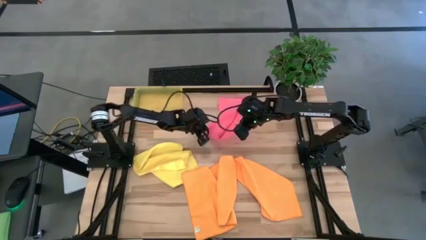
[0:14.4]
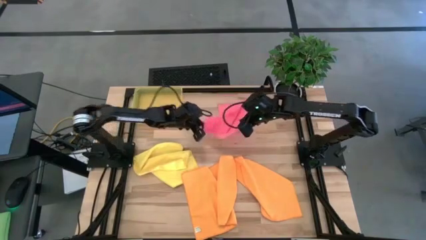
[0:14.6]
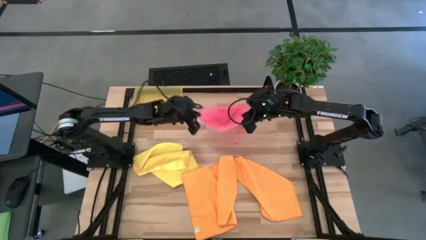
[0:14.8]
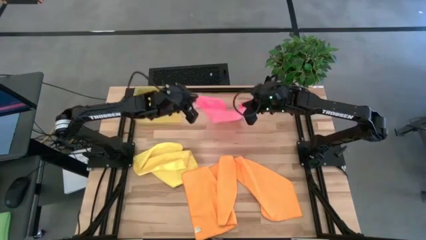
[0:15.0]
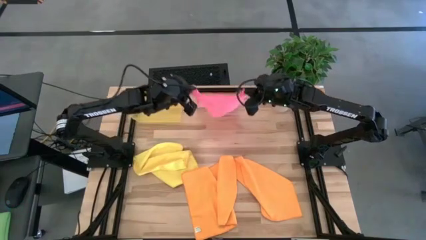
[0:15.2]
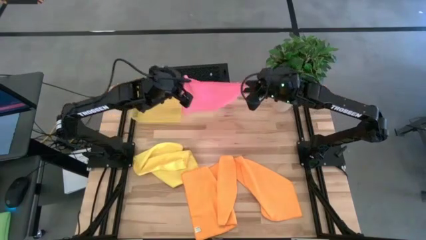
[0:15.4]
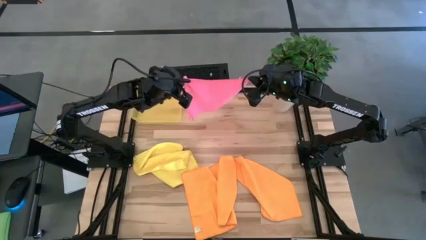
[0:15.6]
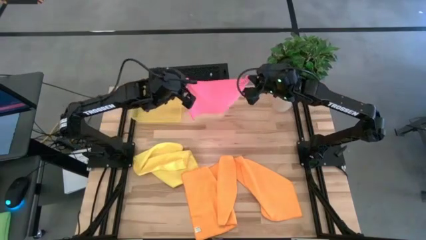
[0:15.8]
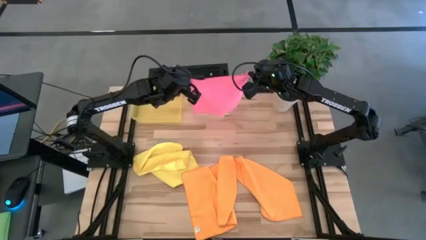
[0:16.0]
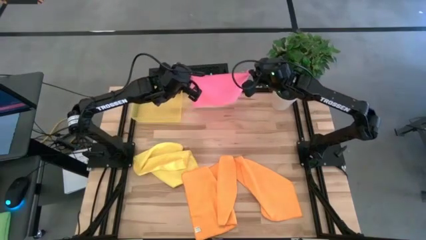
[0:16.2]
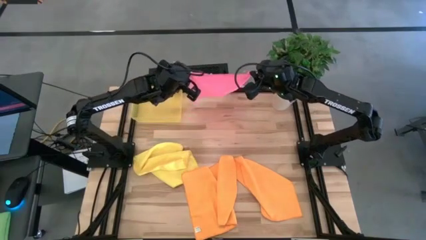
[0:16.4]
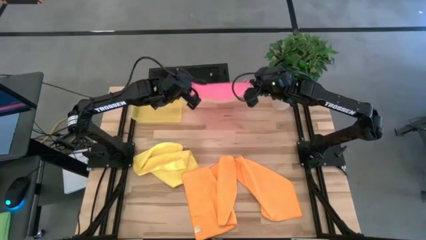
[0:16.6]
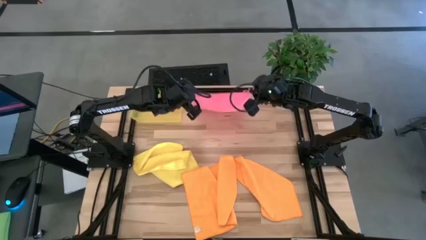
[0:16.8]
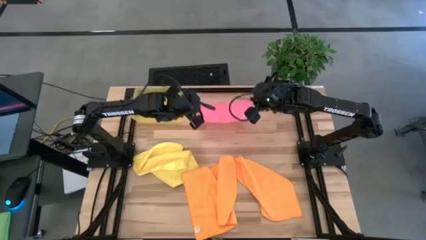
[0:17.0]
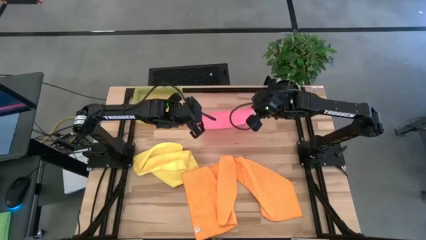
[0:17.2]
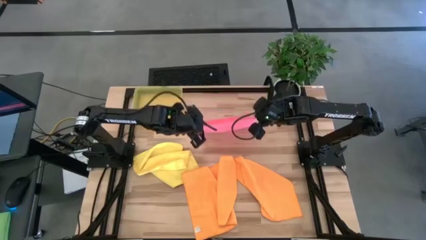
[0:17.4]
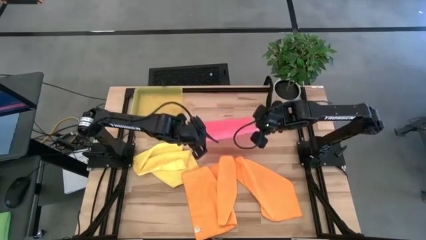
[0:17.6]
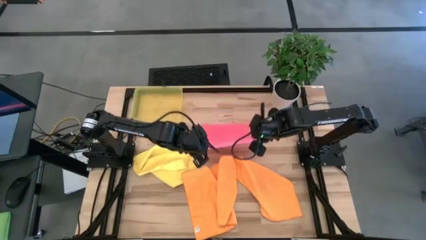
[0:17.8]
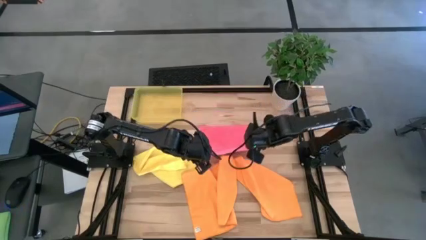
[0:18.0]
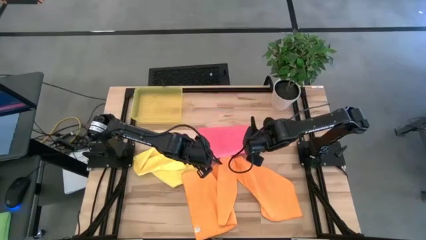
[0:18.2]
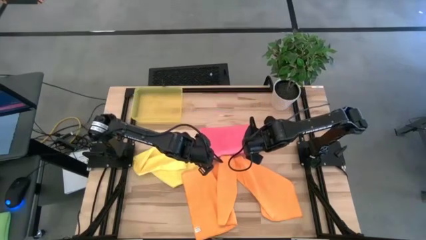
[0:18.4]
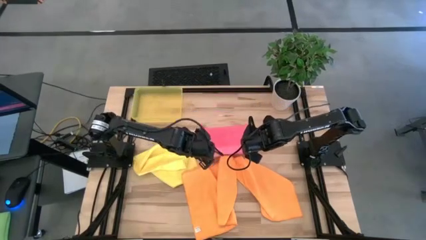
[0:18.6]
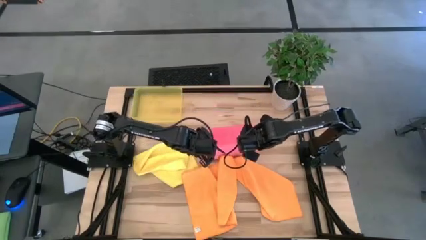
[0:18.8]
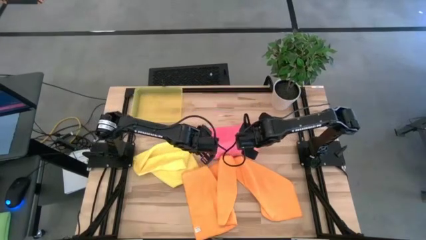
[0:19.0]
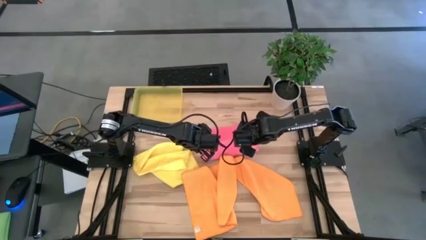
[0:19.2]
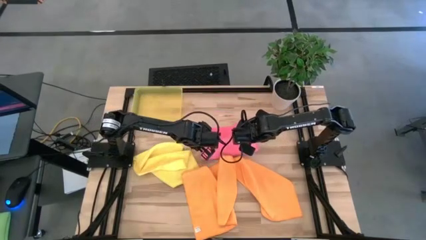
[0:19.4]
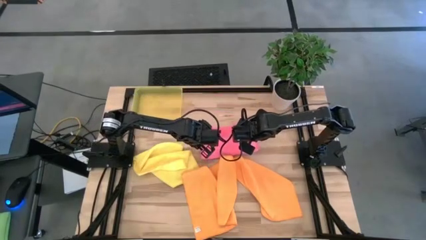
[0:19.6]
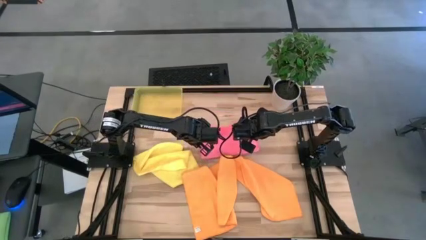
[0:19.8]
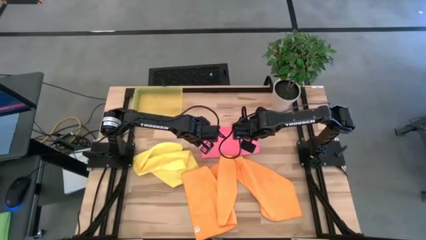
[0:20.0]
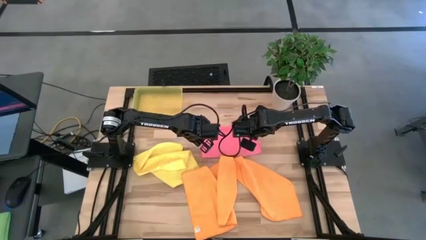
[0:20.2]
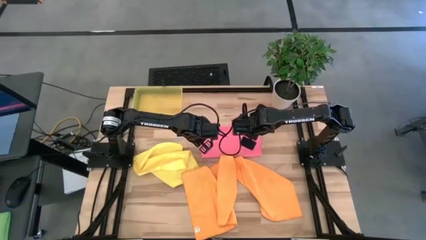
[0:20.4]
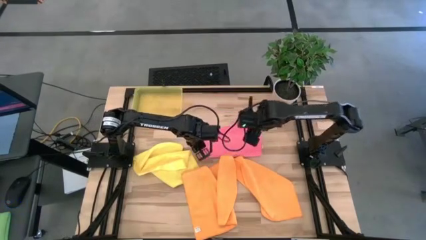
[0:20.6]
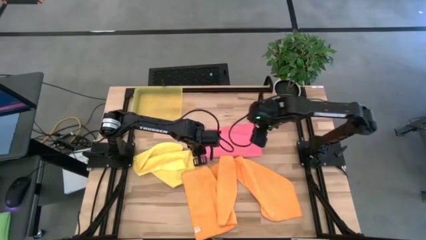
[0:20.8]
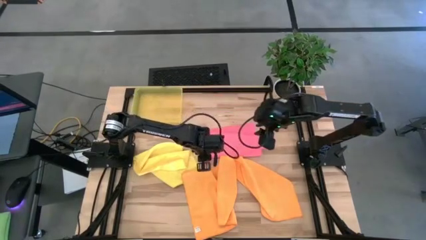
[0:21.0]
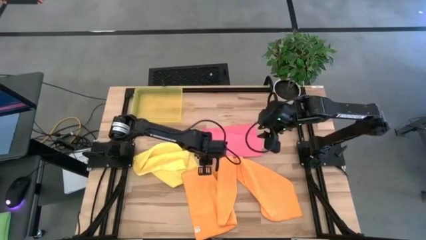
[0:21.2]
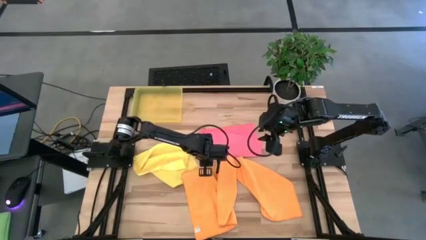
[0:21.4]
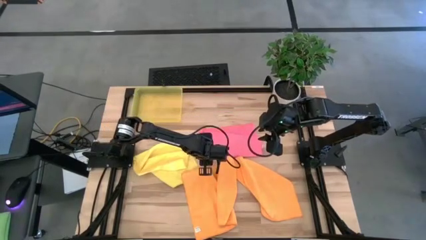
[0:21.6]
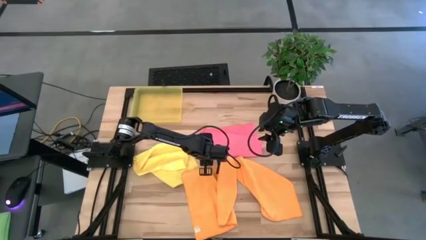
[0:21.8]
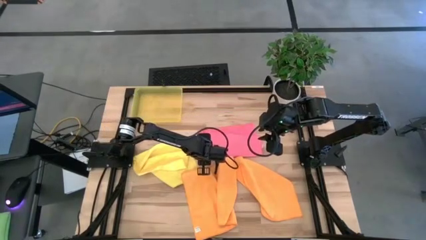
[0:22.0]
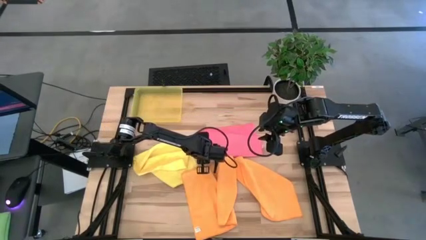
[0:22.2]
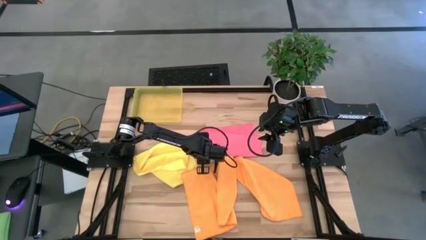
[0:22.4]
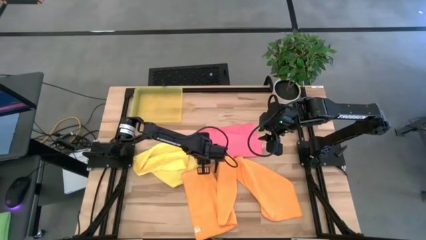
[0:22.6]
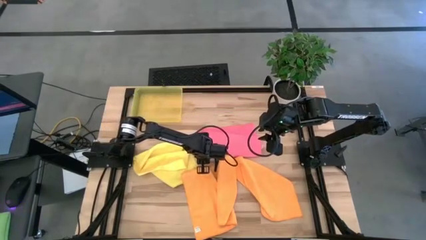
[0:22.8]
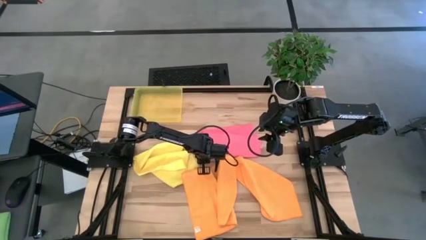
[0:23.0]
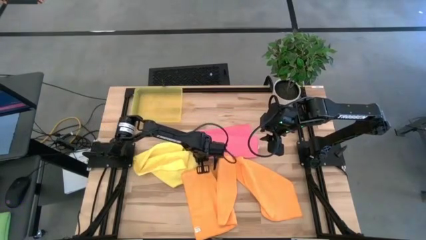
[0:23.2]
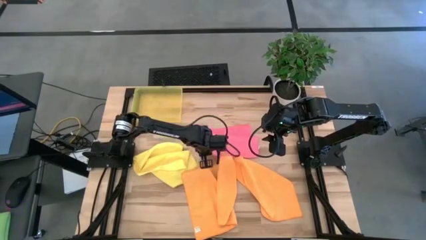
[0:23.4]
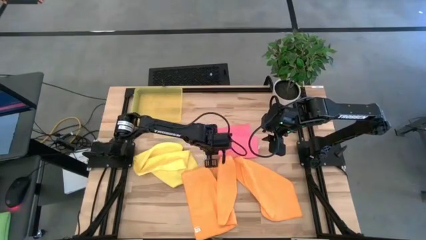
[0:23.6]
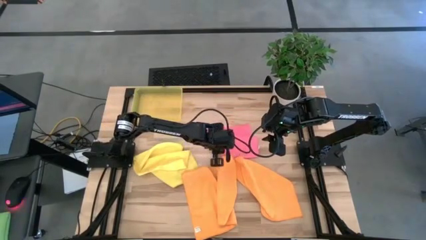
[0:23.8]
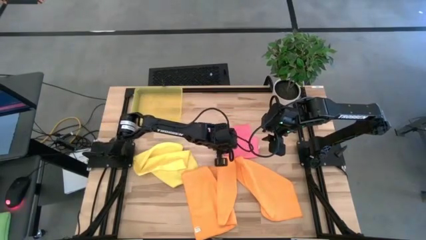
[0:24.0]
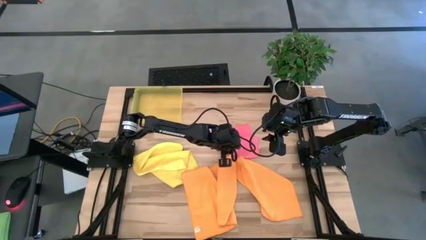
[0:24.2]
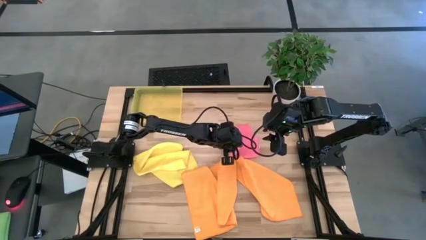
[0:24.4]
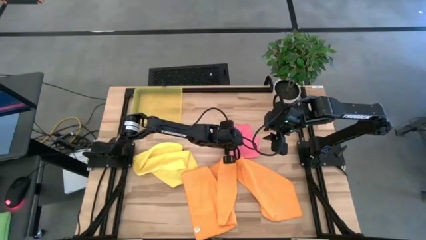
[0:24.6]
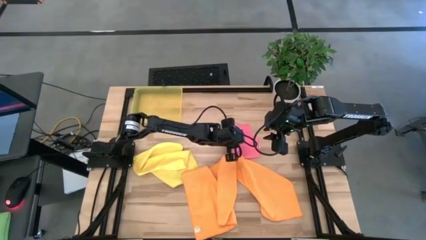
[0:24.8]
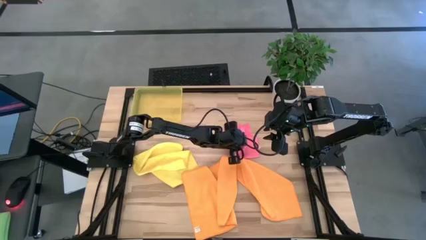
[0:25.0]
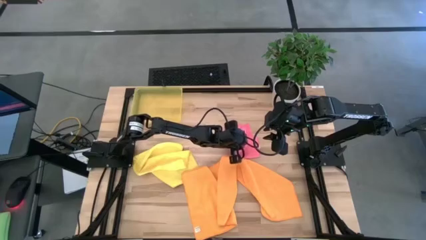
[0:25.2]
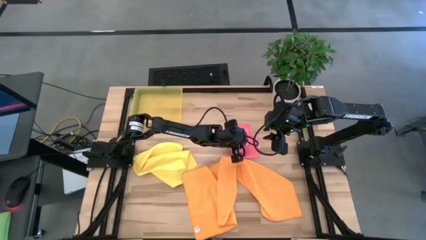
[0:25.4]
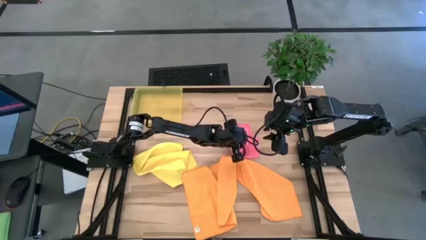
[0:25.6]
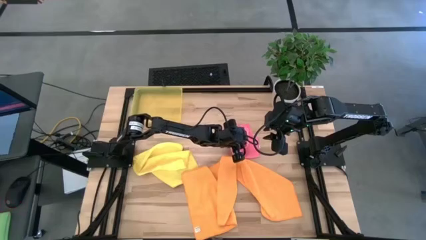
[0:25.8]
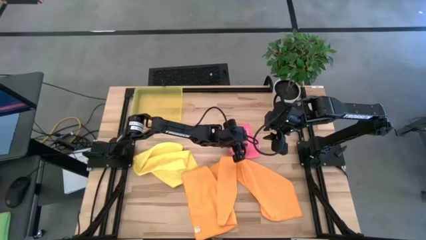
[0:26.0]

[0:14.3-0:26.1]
Task: Fold microfiber towels
Fold the pink microfiber cloth

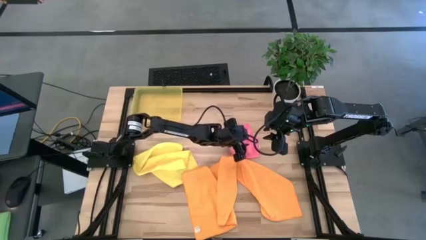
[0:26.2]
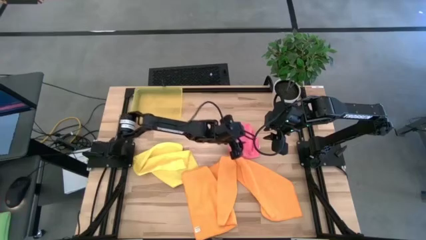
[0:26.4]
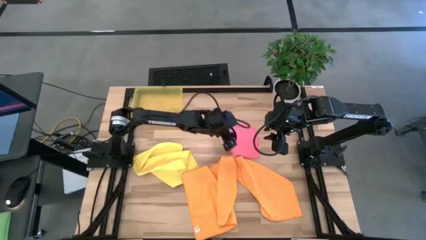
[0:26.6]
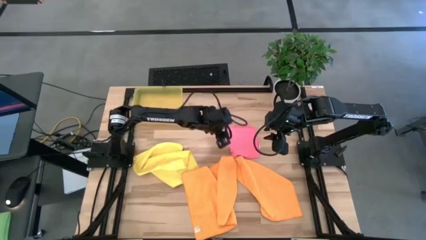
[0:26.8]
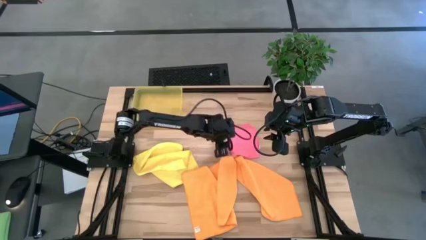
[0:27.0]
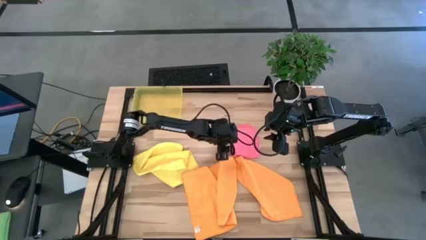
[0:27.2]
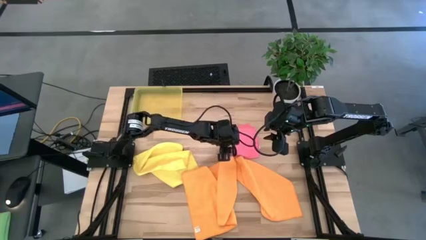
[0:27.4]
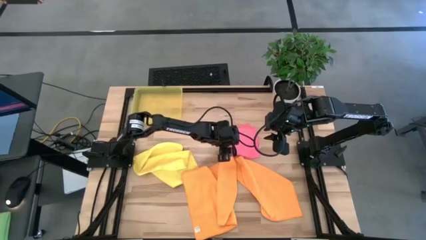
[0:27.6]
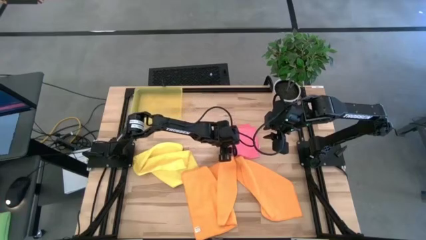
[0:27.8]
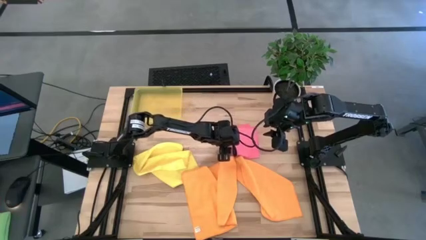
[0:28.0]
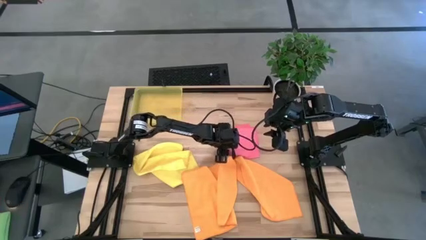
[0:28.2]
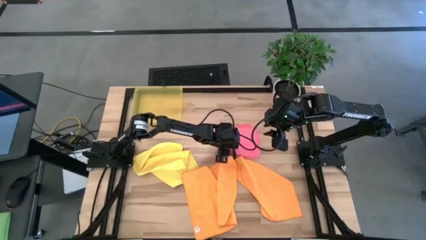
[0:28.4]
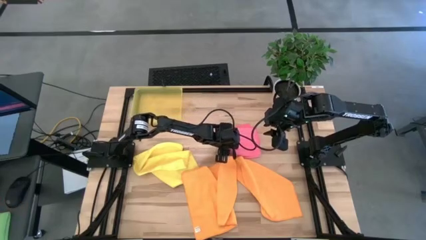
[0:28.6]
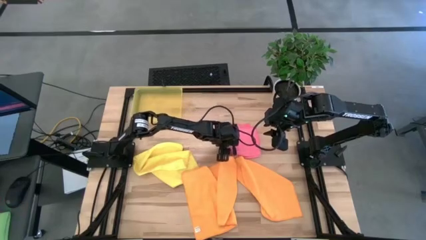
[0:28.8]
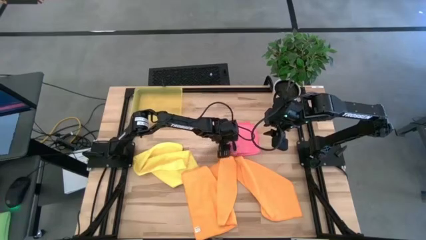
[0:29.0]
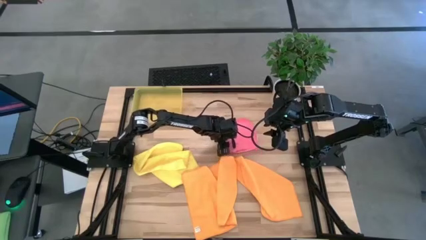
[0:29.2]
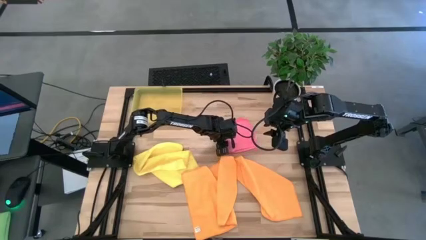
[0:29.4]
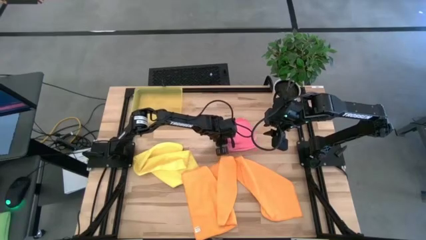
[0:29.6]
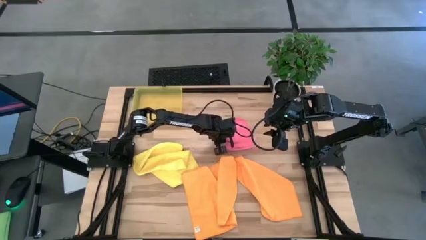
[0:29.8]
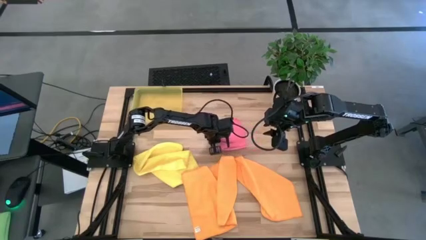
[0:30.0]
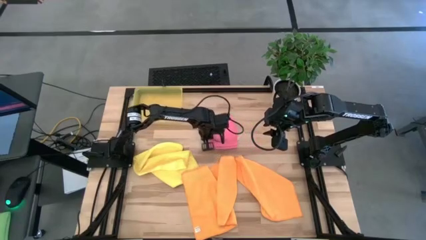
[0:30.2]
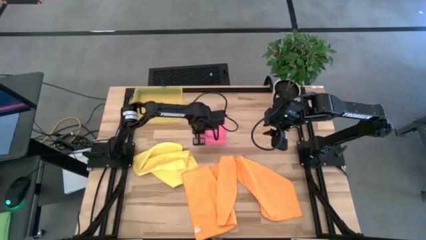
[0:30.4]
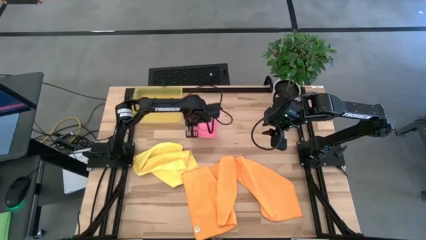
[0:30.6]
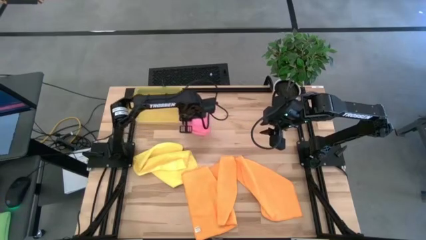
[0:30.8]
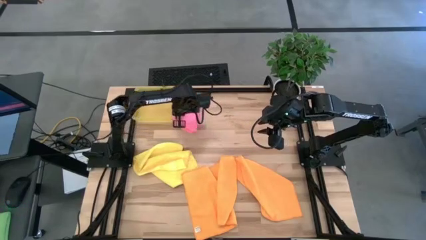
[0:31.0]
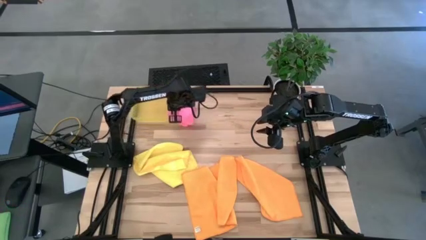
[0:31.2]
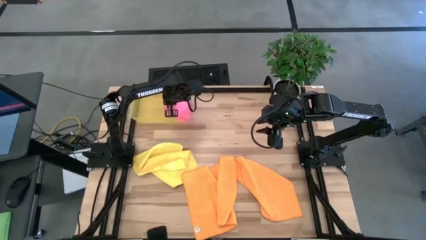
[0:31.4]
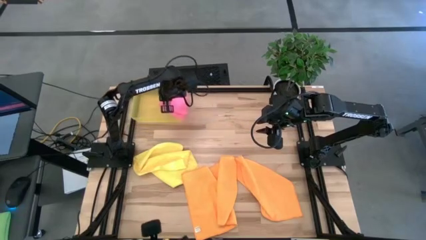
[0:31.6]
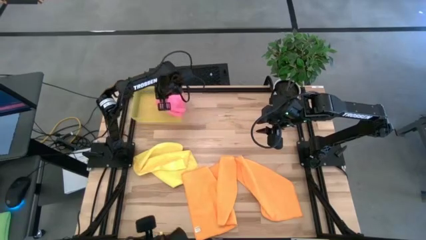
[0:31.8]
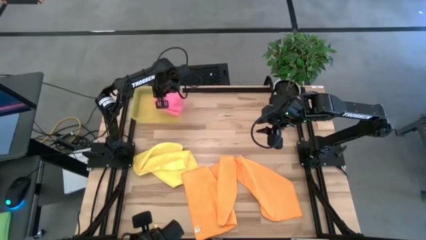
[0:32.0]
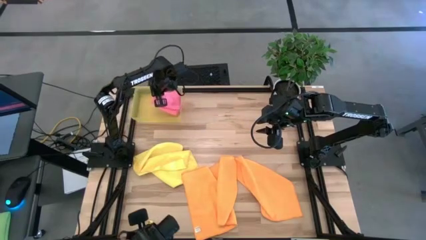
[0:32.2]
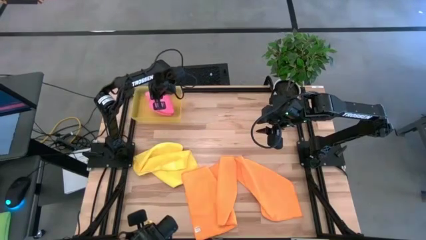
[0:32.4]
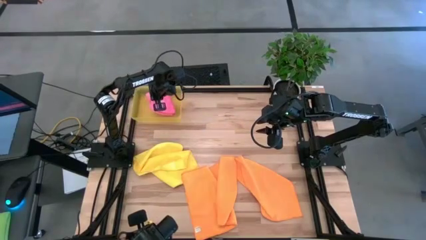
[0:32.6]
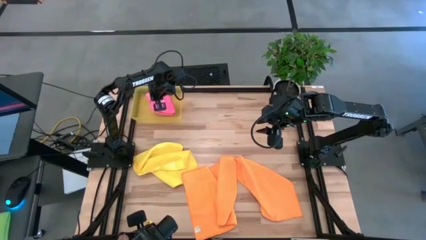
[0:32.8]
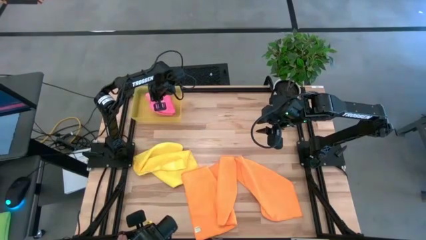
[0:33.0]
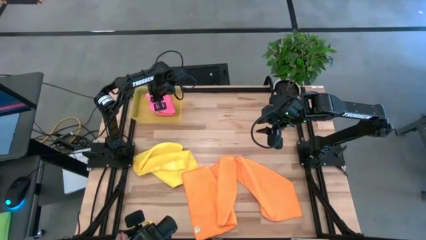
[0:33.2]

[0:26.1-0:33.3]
Put the folded pink microfiber cloth into the yellow bin
